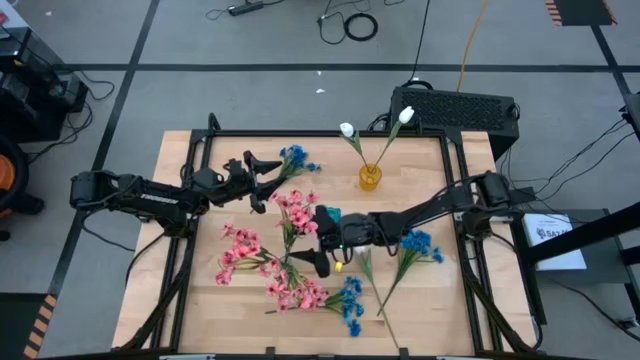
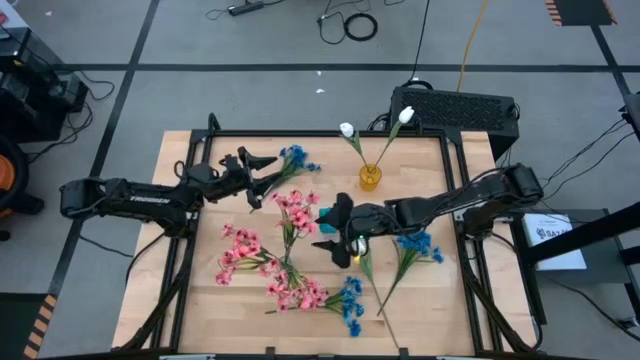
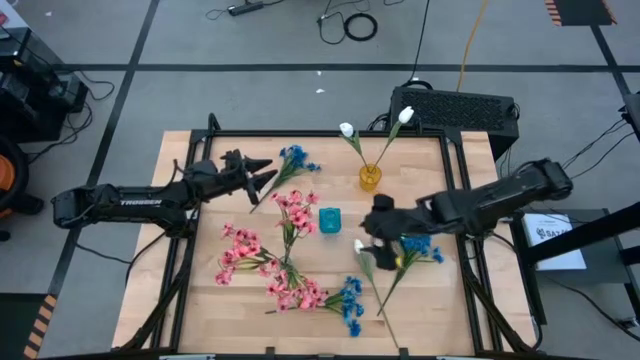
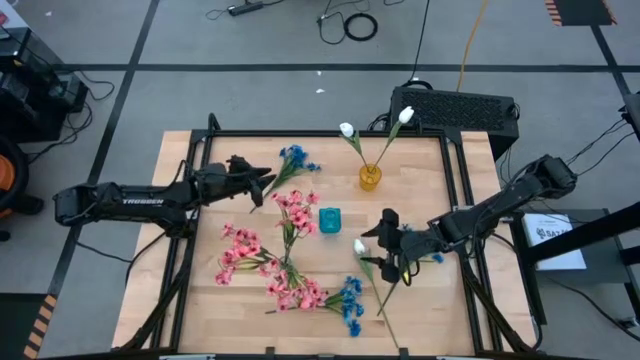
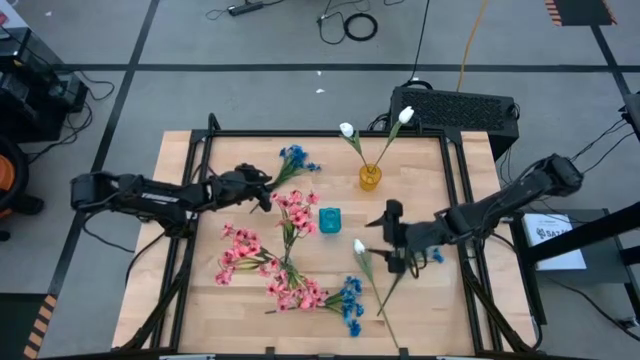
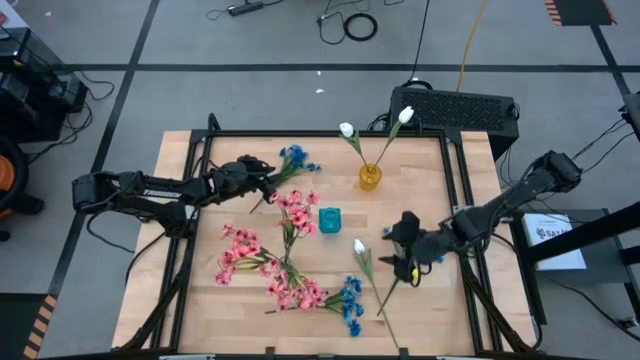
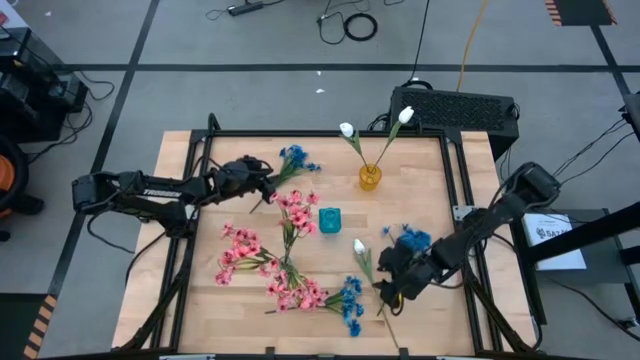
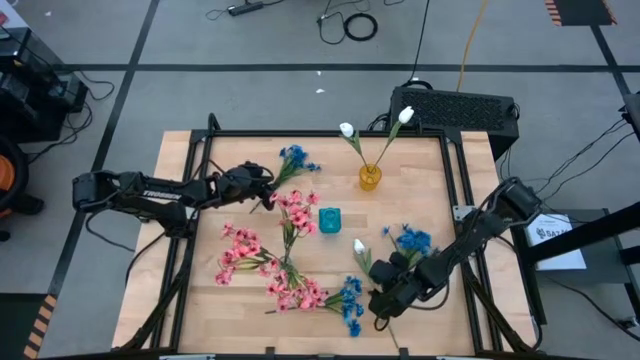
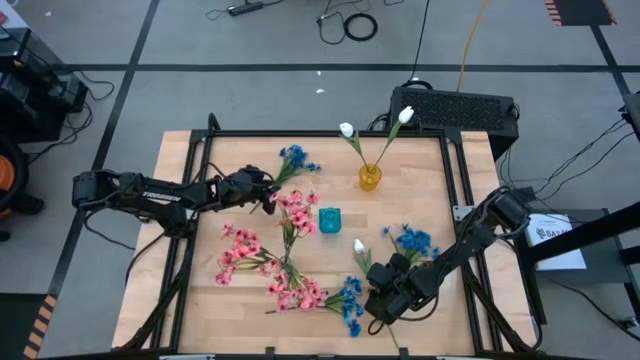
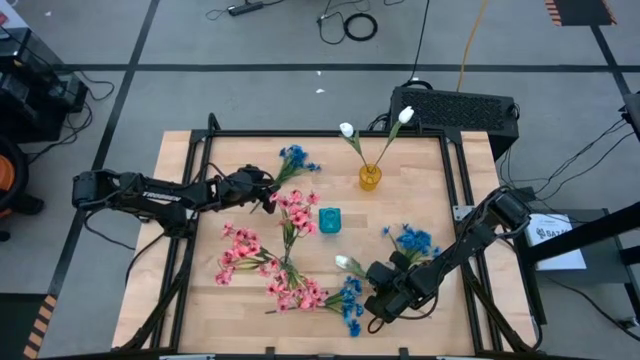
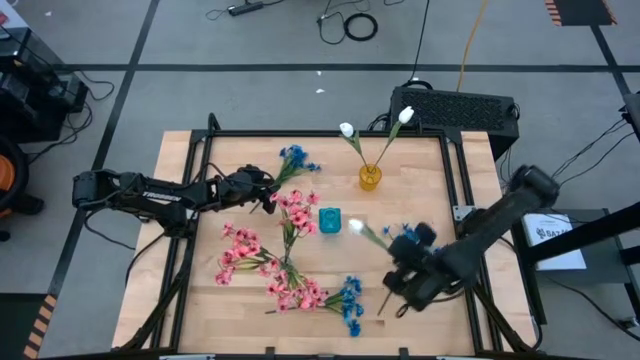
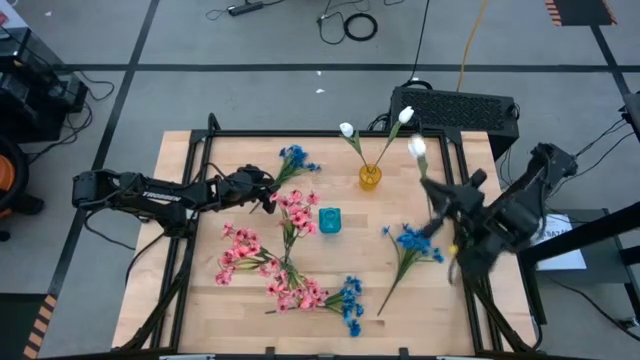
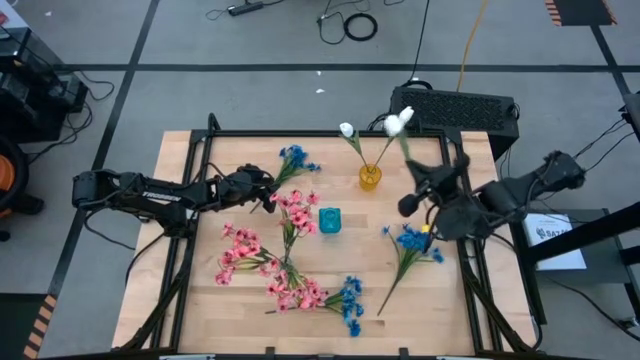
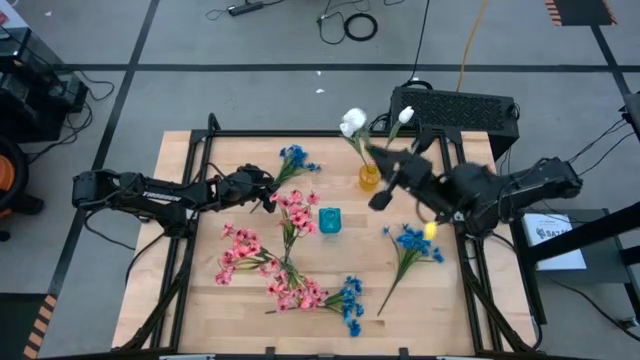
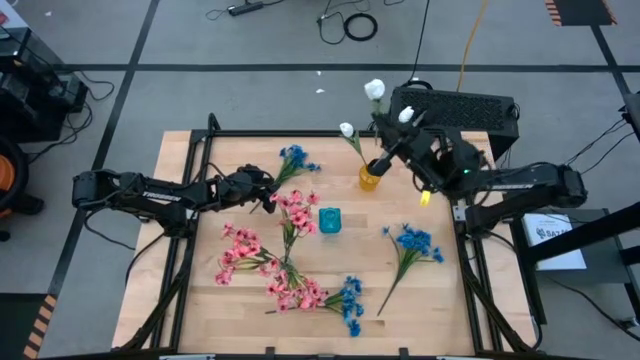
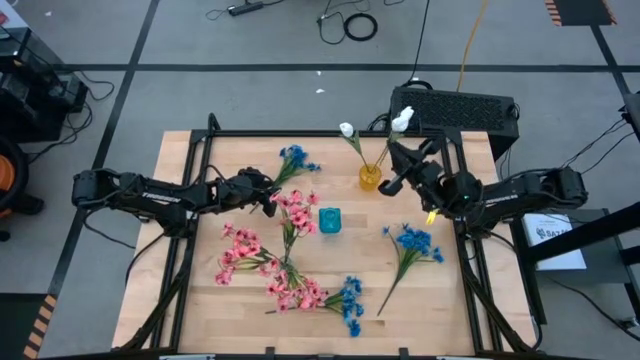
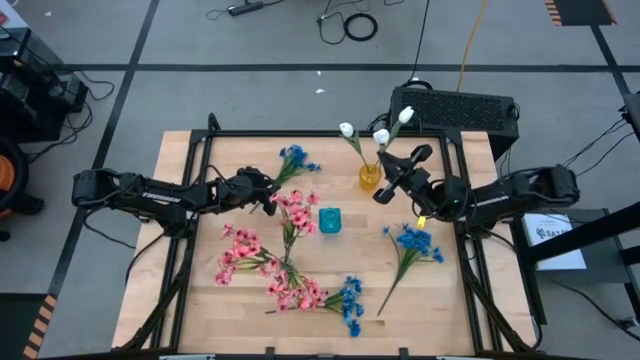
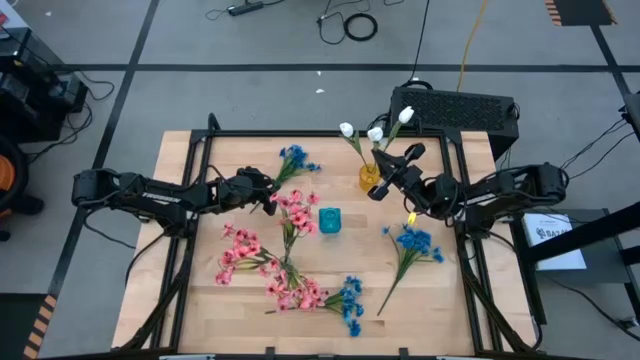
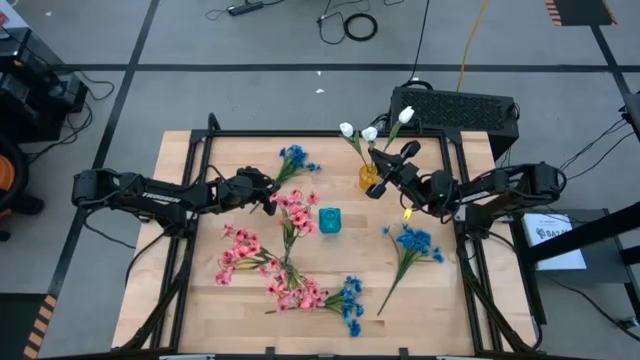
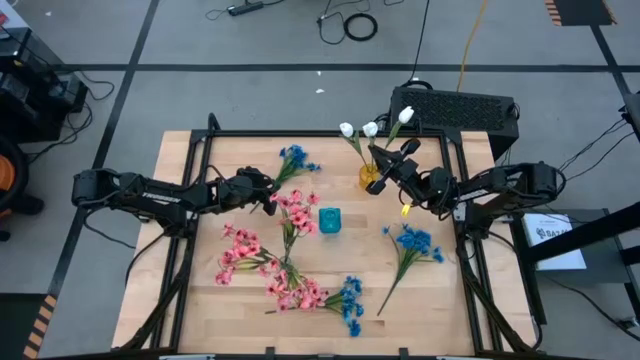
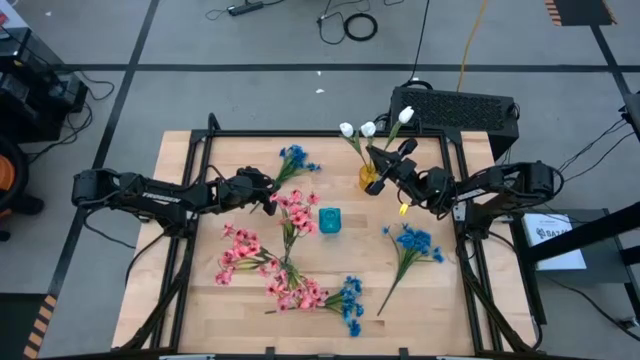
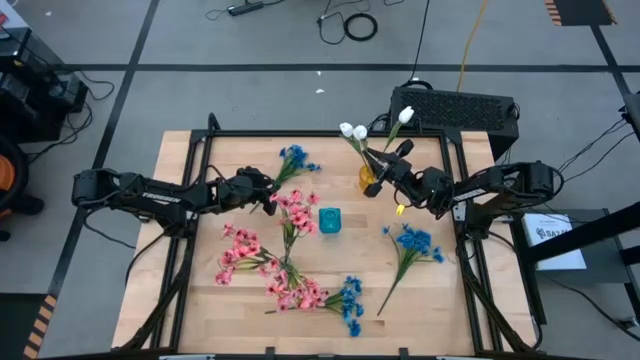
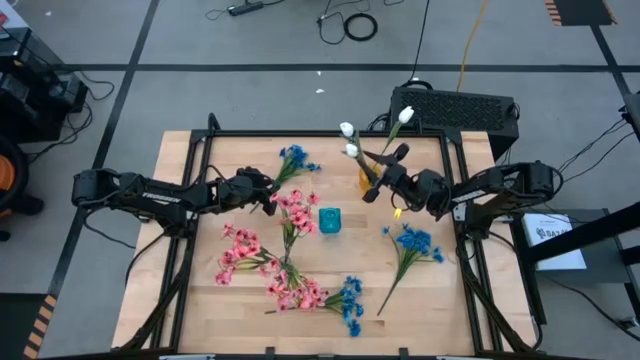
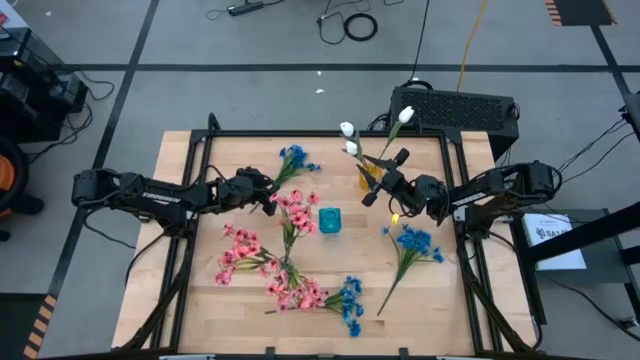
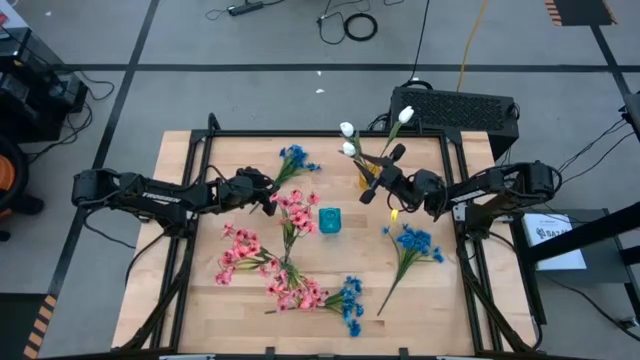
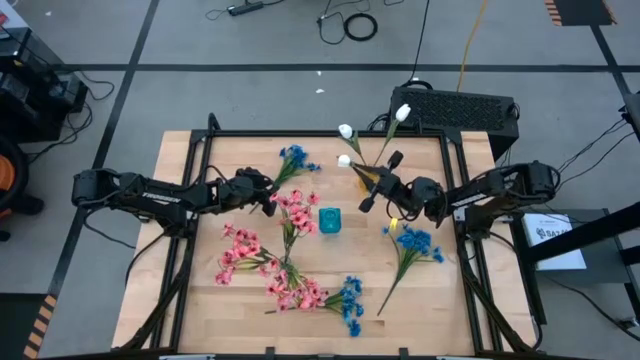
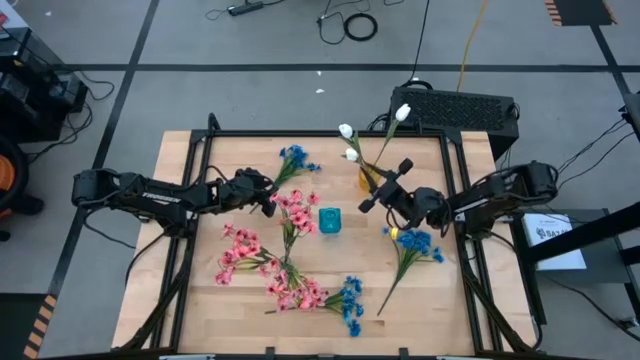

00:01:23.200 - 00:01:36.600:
Task: Sort flowers into vase by color
Put the white tulip into the yellow vase

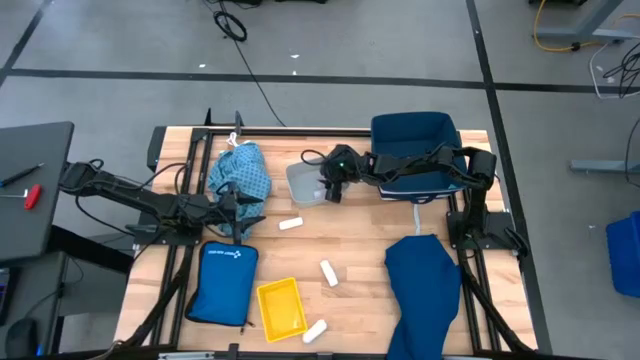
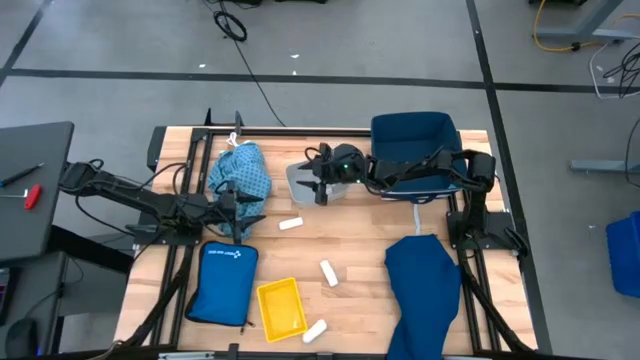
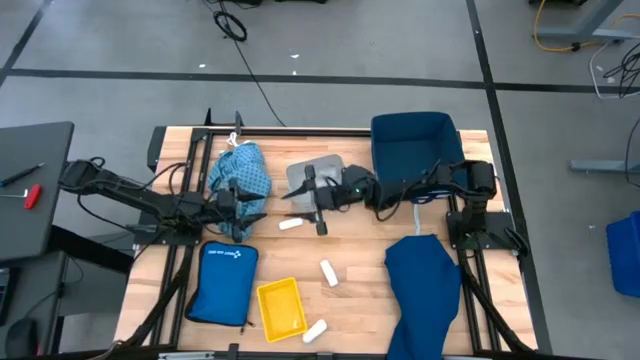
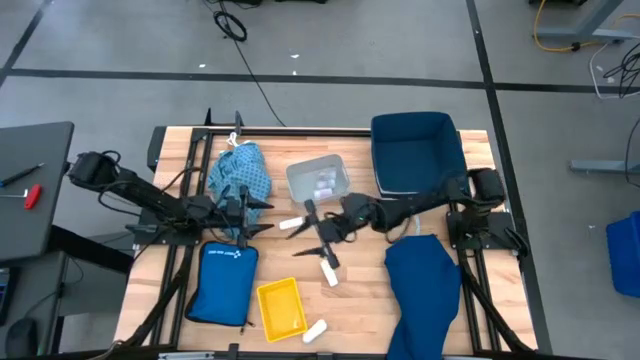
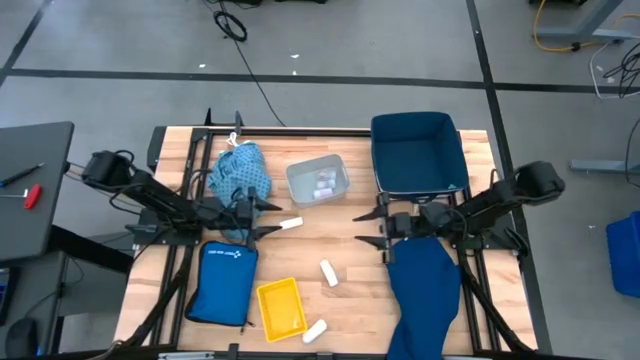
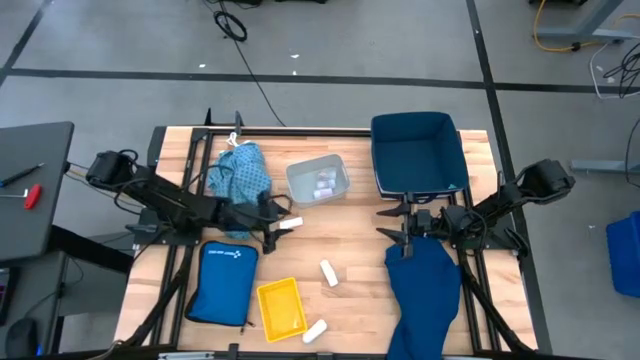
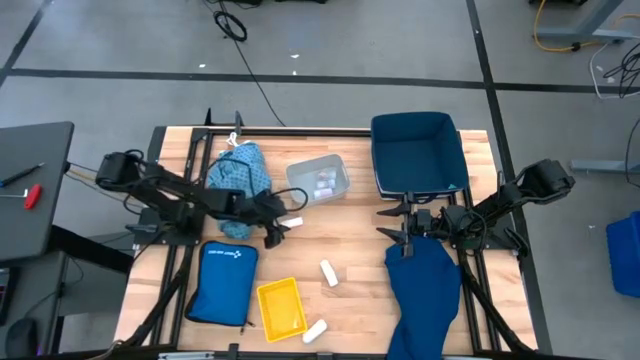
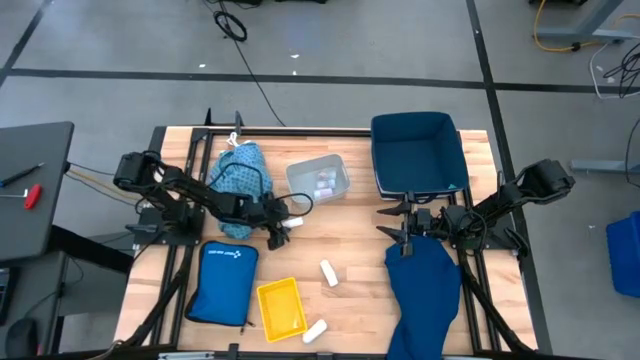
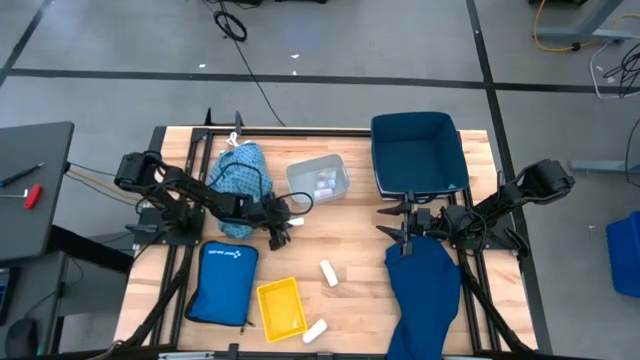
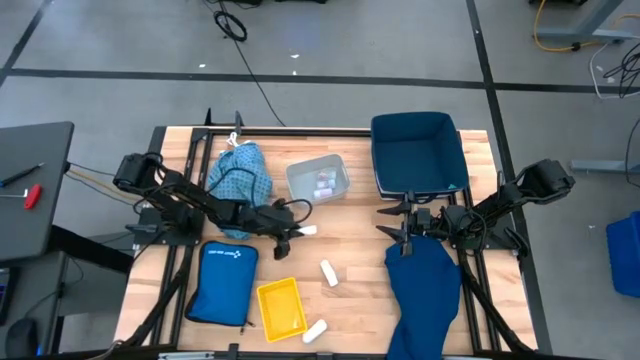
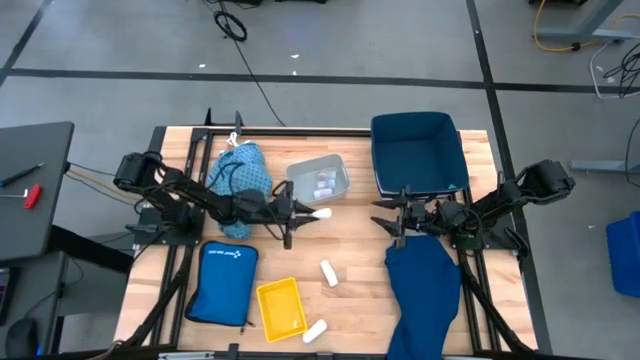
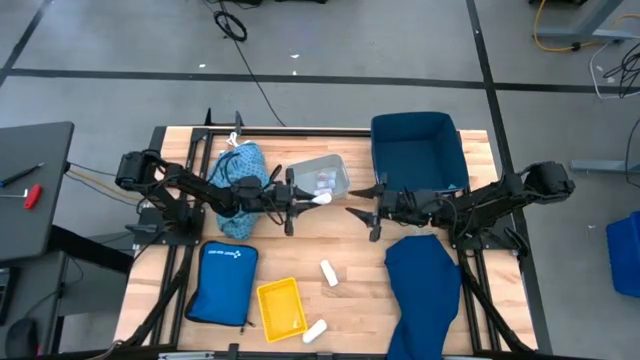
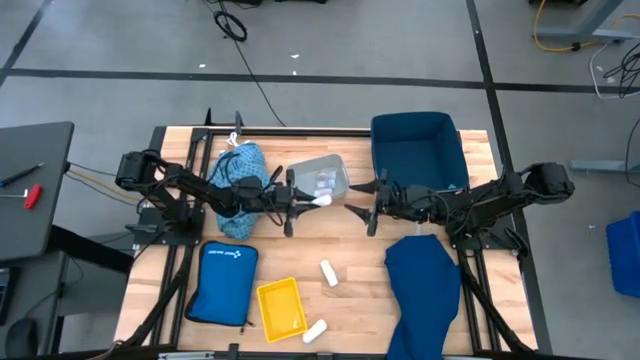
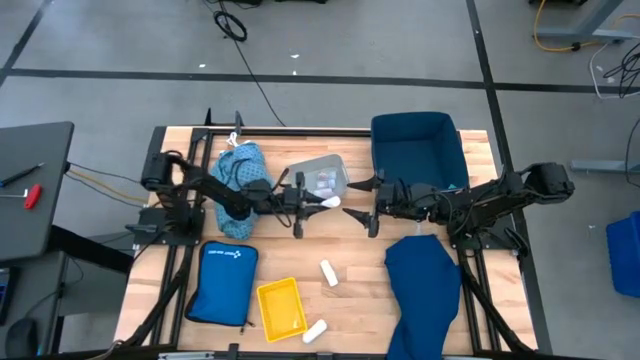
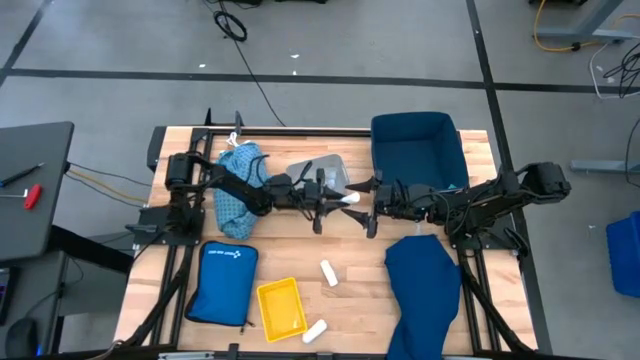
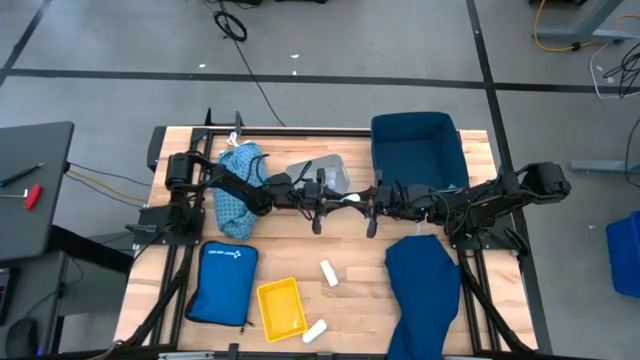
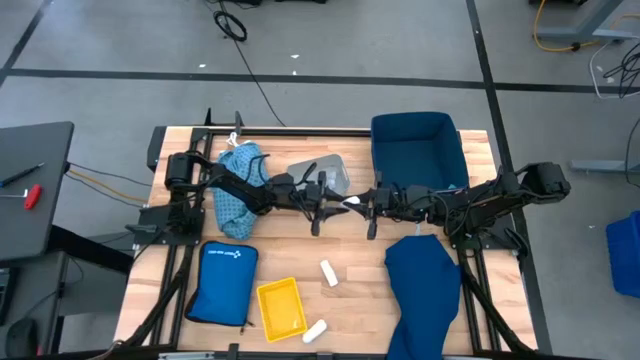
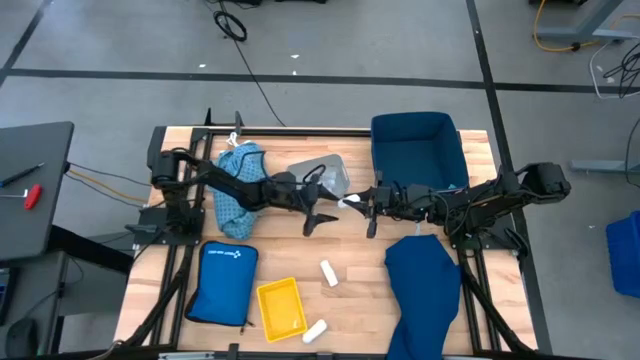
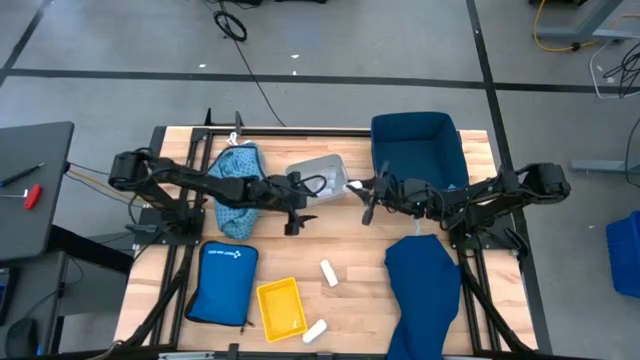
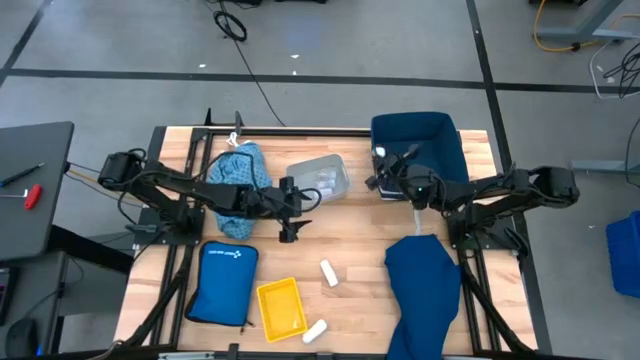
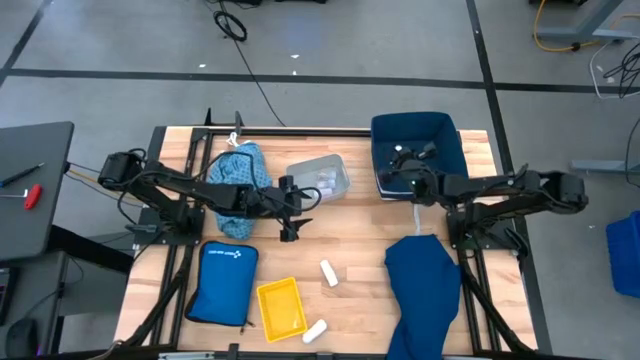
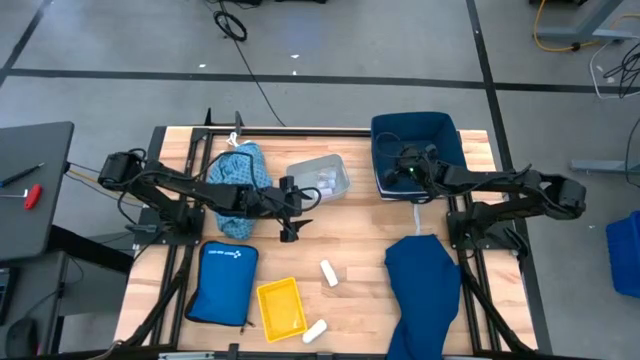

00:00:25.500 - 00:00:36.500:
Task: Pick & place medical supplies in basket/bin
Put the top rolled gauze into the blue laundry organizer
